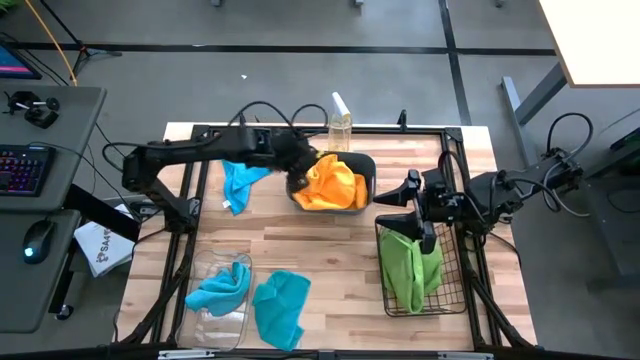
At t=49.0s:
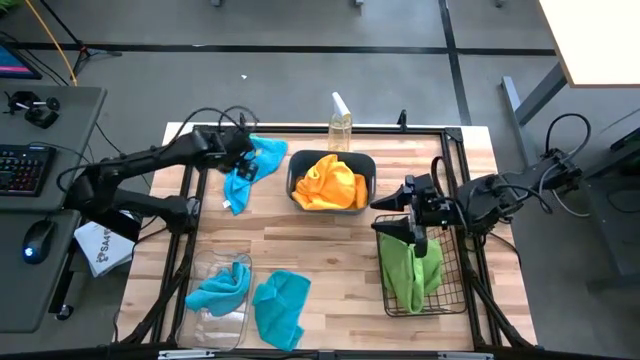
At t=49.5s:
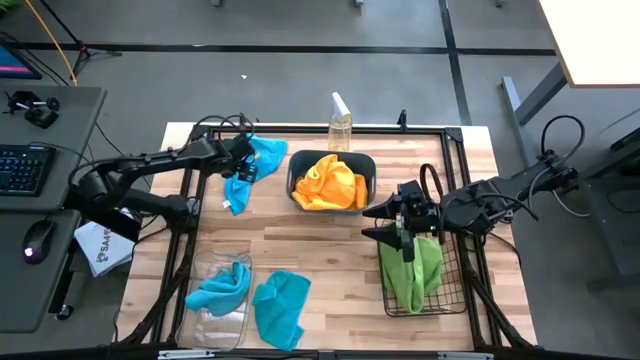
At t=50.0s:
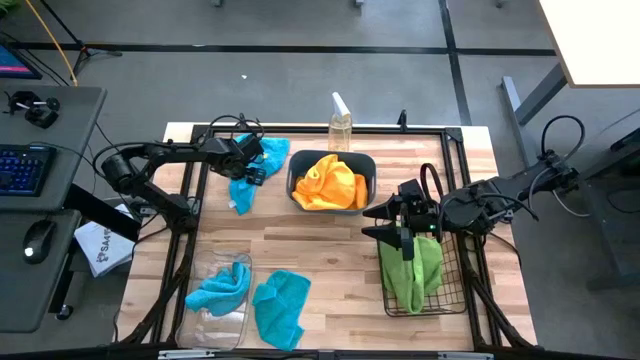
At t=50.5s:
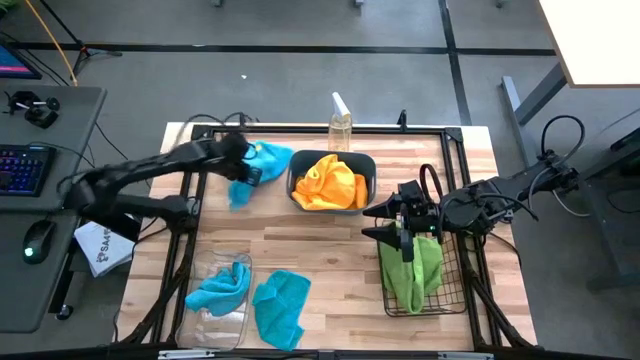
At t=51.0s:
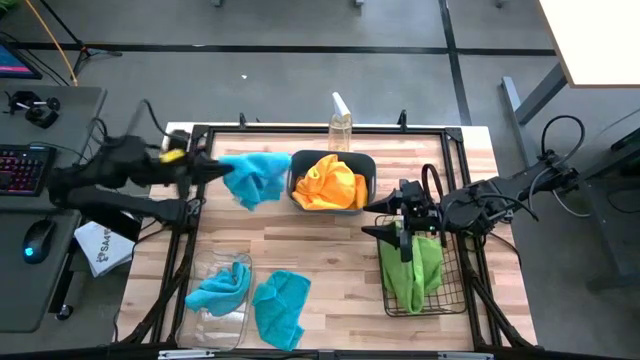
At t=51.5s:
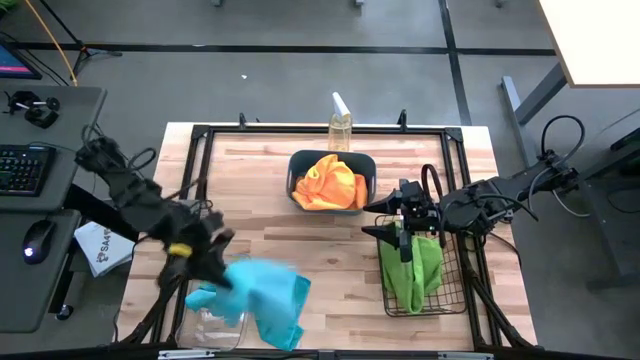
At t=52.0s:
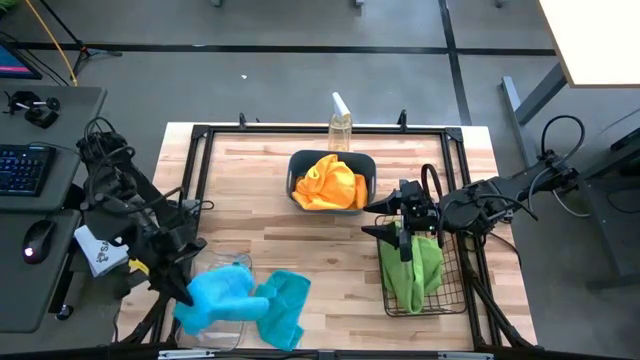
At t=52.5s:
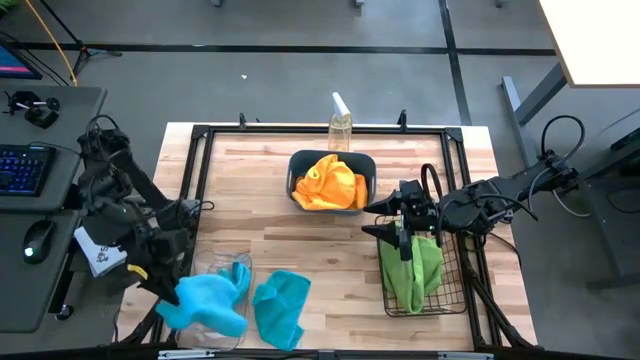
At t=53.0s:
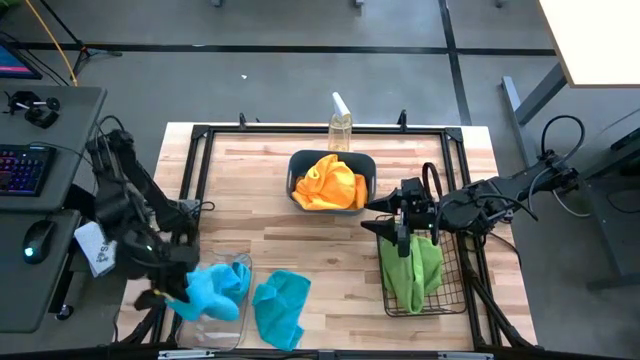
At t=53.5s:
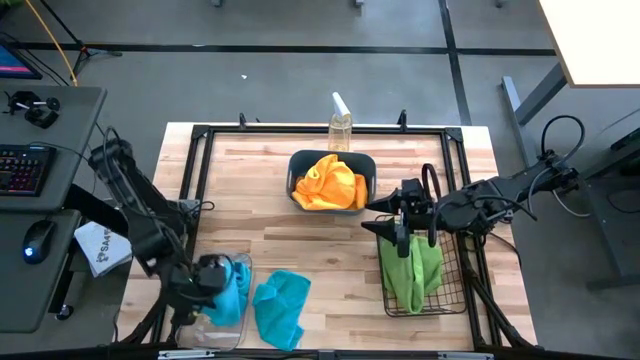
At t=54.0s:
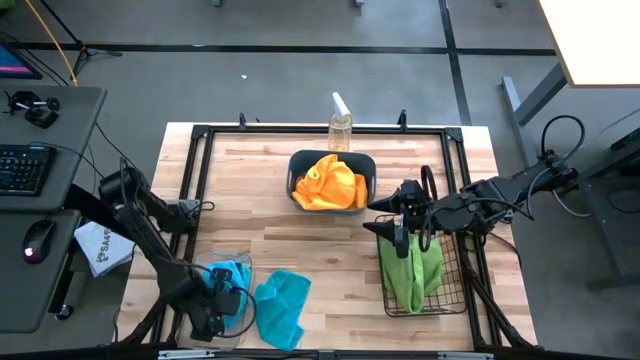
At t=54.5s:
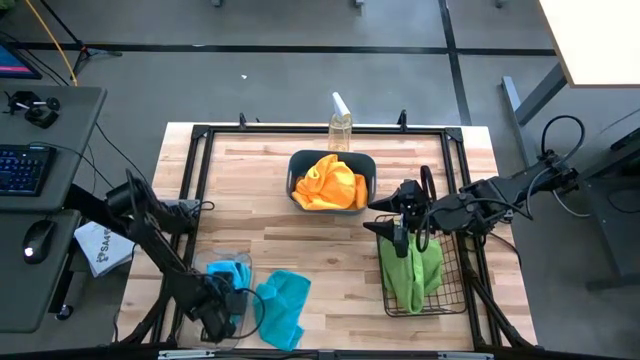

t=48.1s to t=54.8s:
Task: Sort microfiber towel by color & place in baskets
Put the top blue towel into the transparent bin

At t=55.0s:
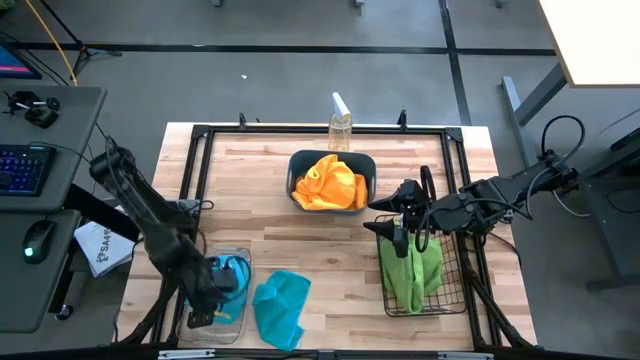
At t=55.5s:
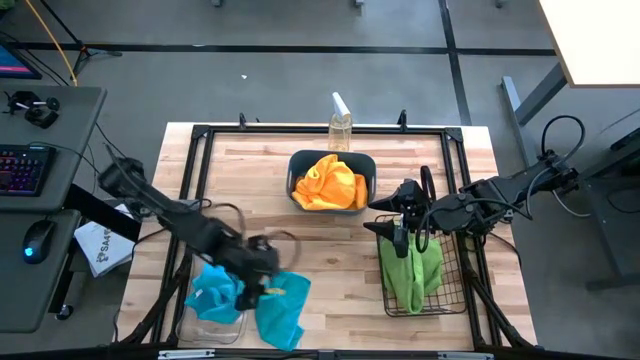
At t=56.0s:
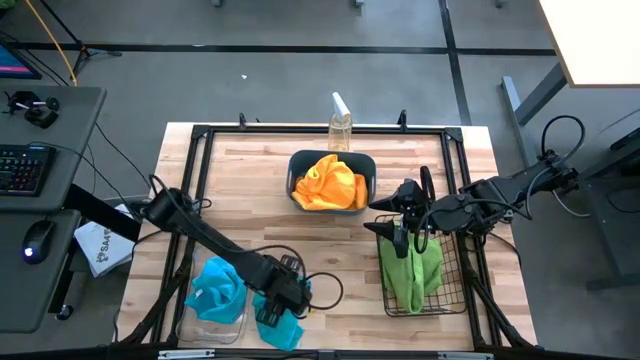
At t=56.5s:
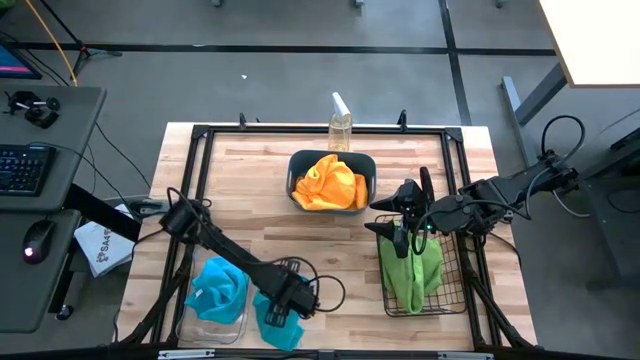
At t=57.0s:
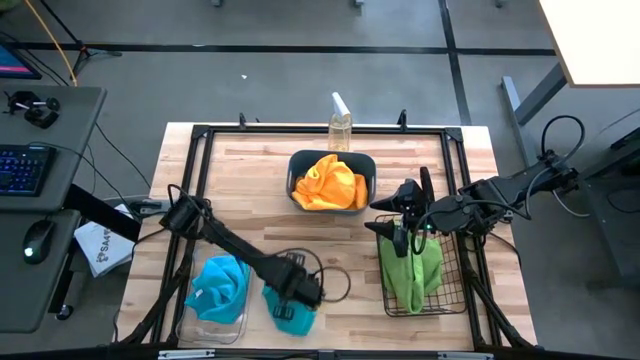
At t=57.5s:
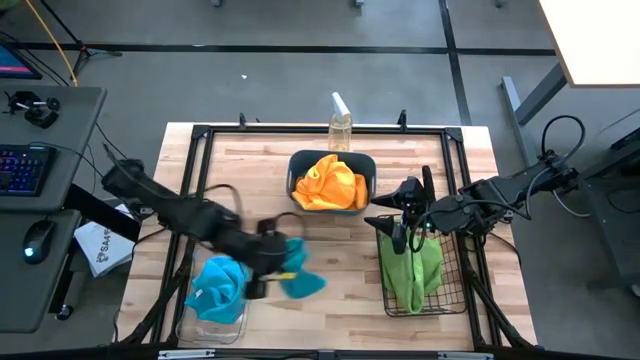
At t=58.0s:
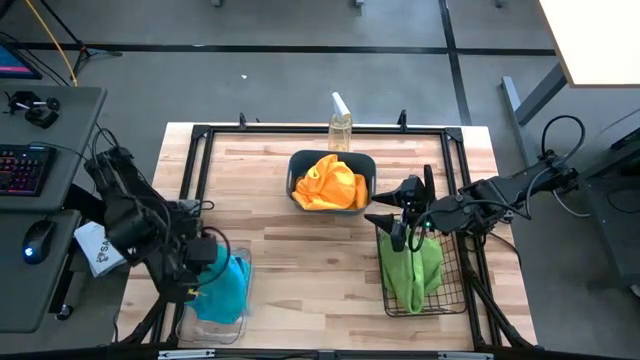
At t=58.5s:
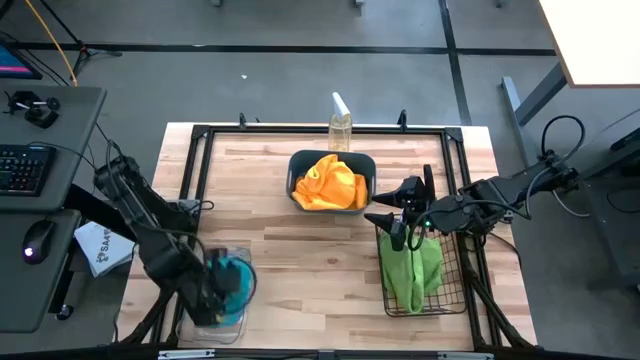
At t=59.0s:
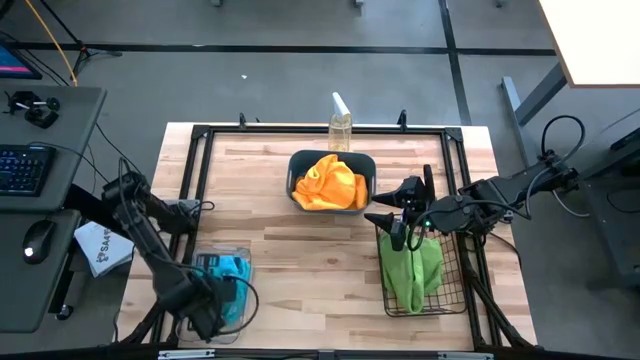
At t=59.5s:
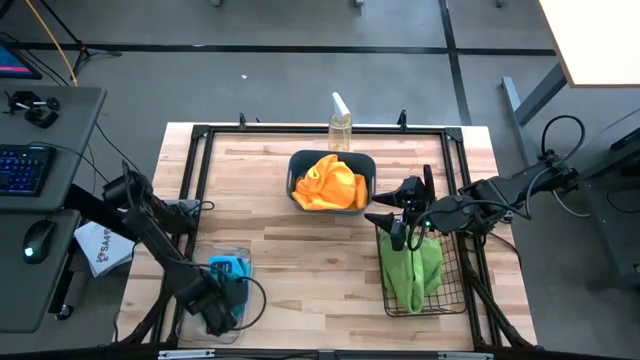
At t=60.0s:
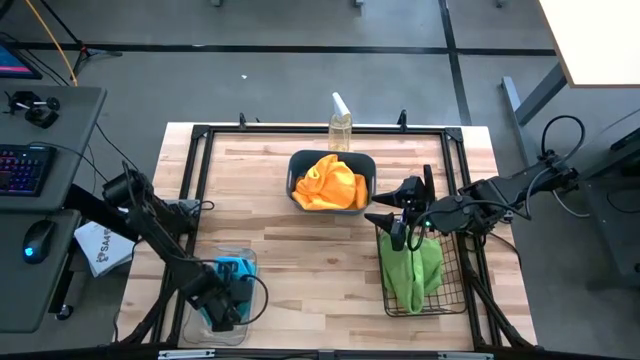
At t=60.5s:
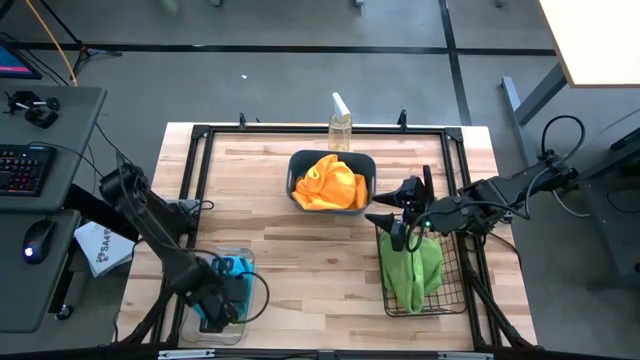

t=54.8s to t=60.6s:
Put the blue towel into the transparent bin

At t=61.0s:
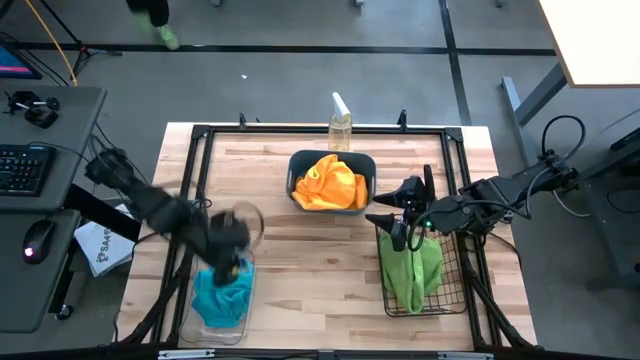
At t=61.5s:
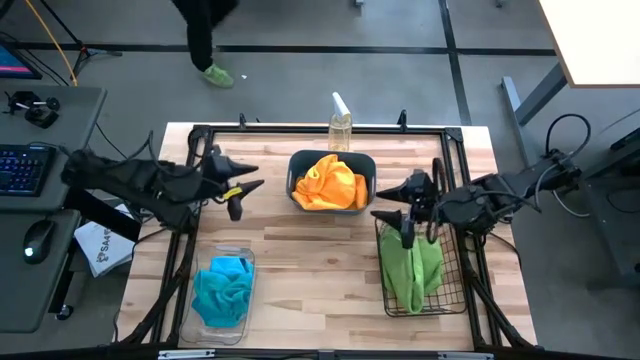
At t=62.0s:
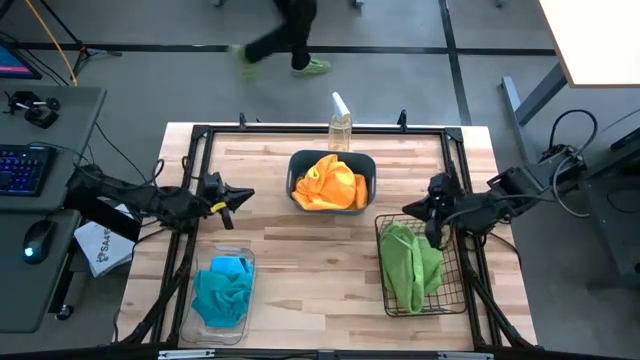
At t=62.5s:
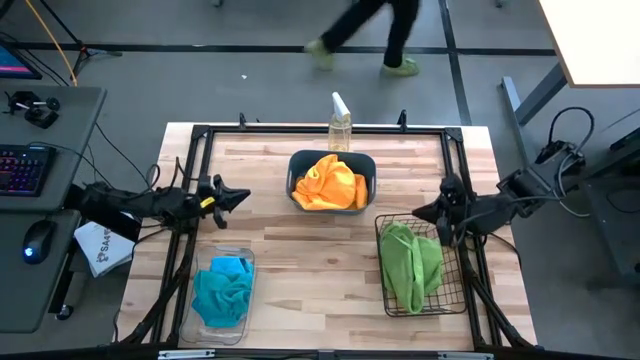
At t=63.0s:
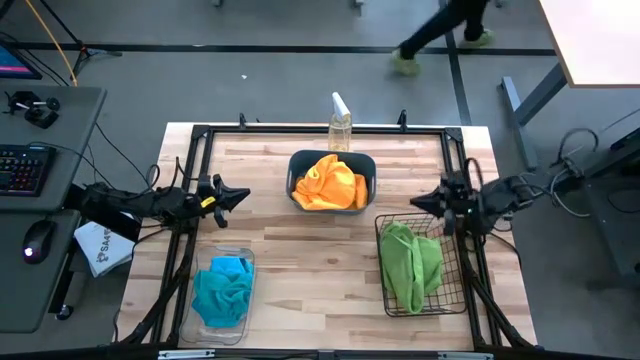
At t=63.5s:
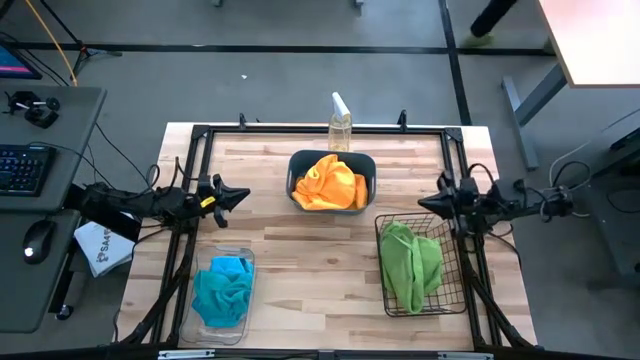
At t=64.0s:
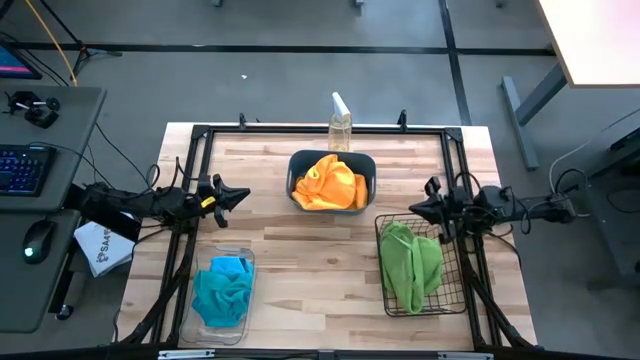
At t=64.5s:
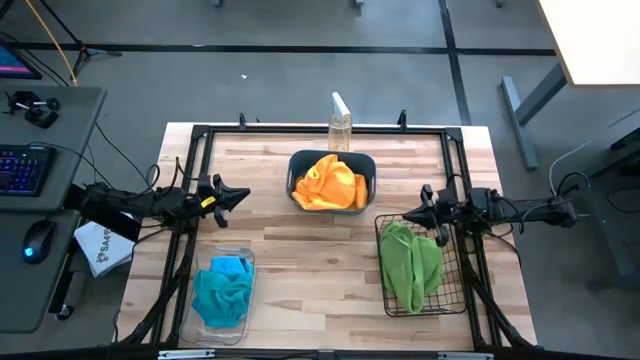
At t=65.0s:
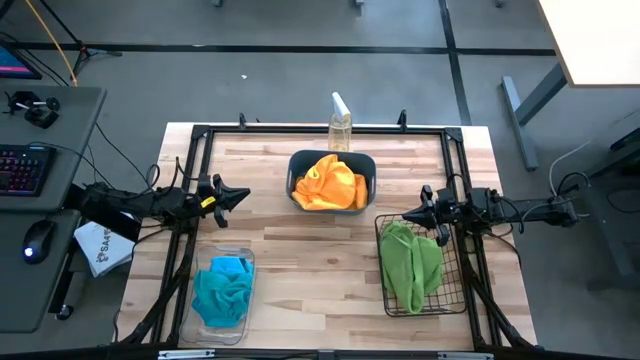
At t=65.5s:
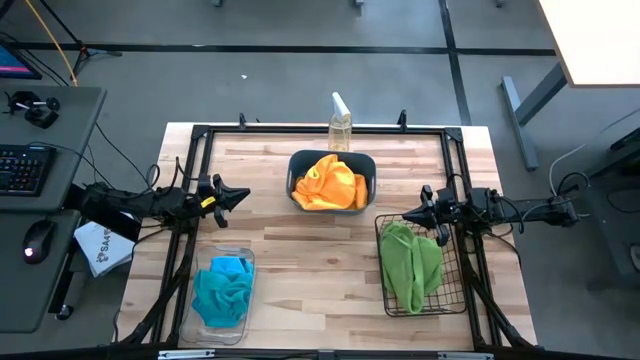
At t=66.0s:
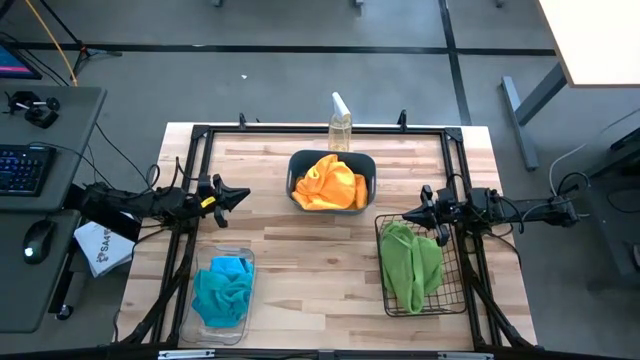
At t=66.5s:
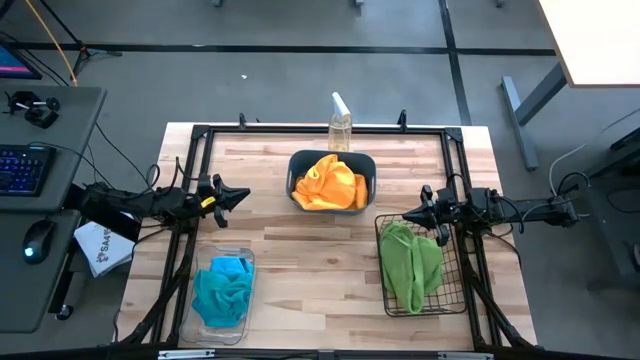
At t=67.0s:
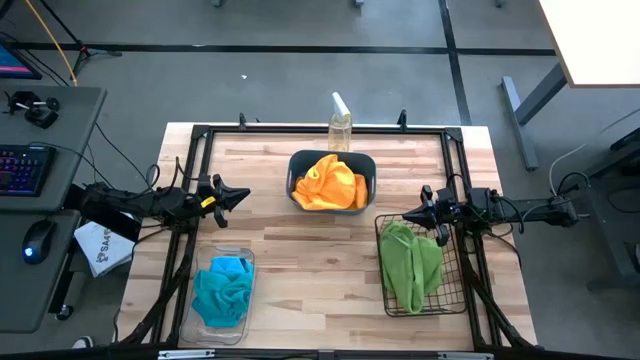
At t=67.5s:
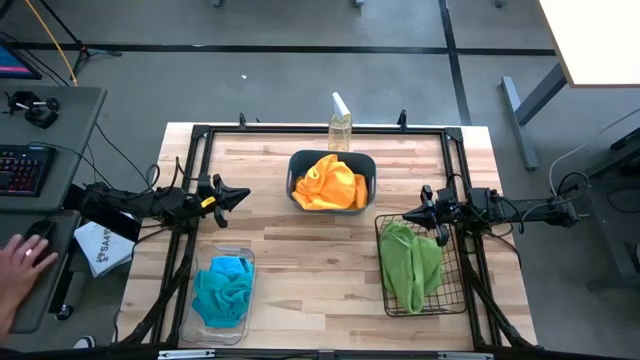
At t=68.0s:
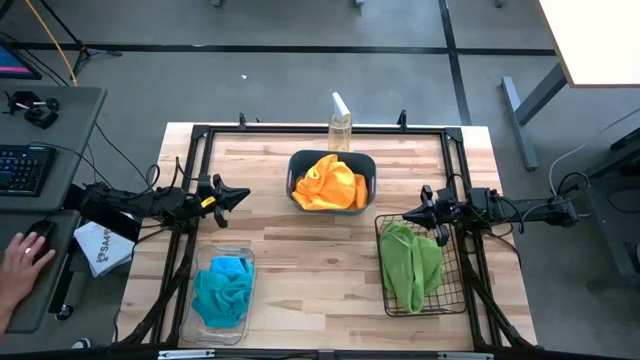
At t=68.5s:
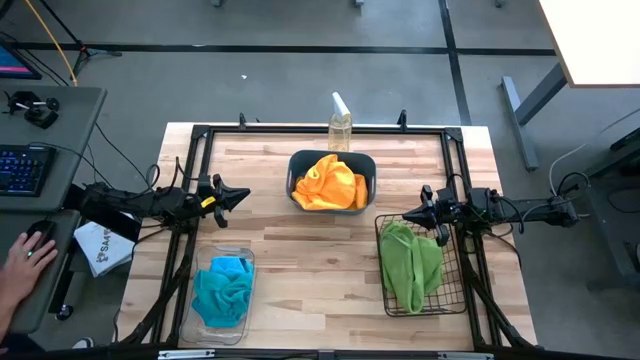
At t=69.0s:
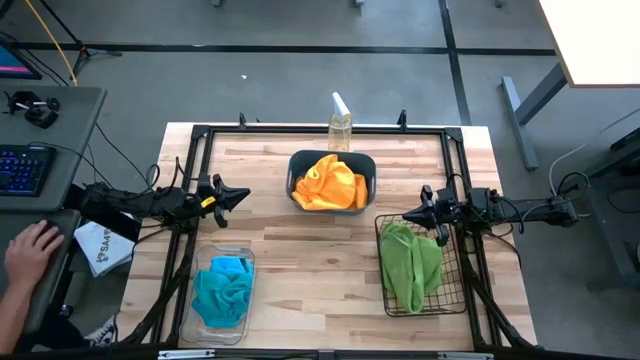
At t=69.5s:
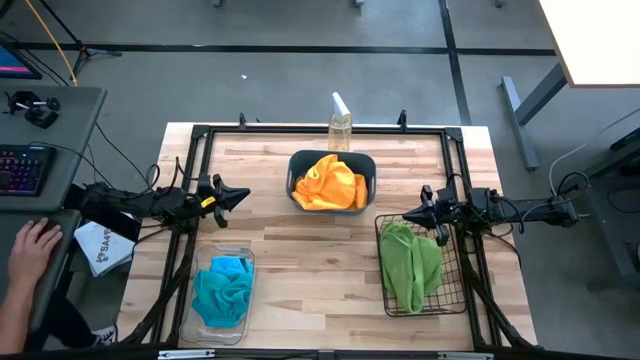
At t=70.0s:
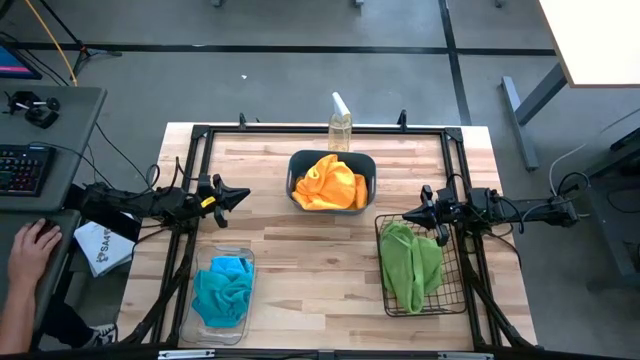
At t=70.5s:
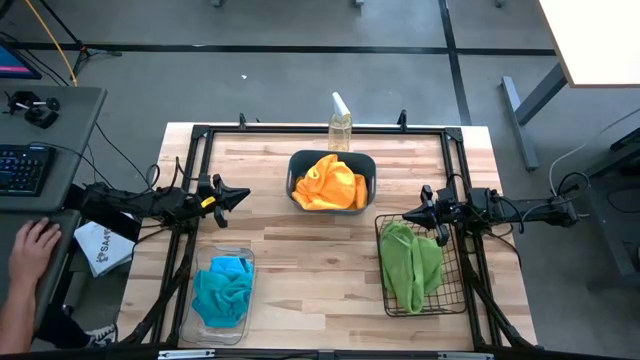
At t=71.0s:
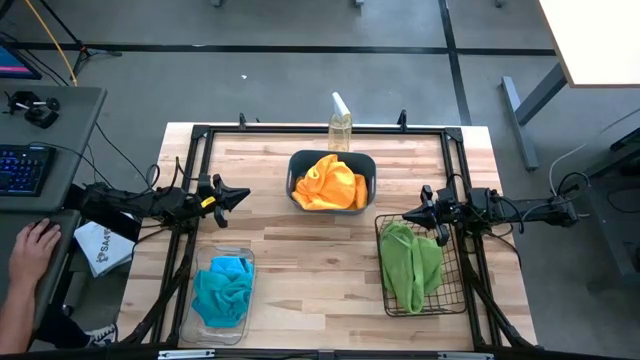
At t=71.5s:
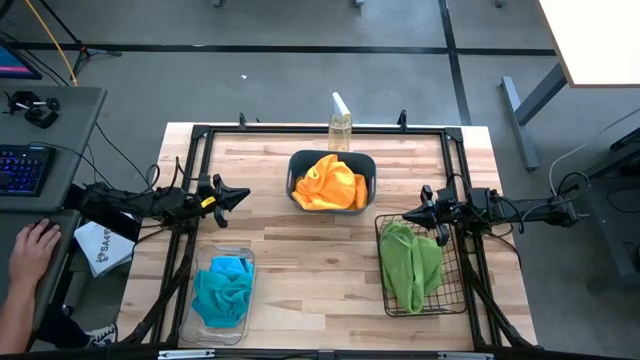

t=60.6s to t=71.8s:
Return to Home Position
